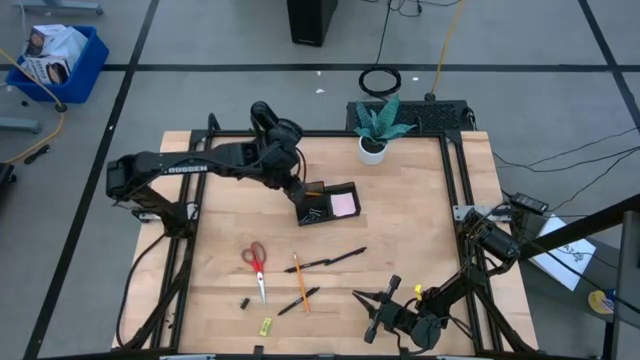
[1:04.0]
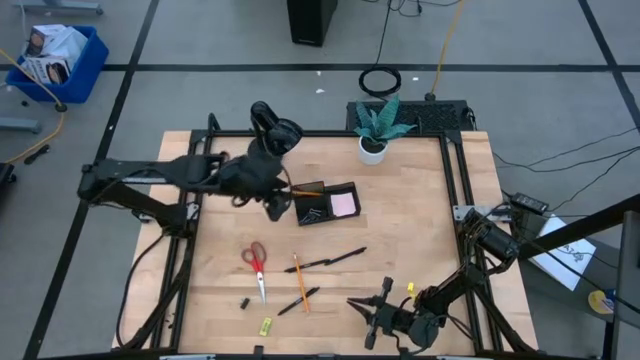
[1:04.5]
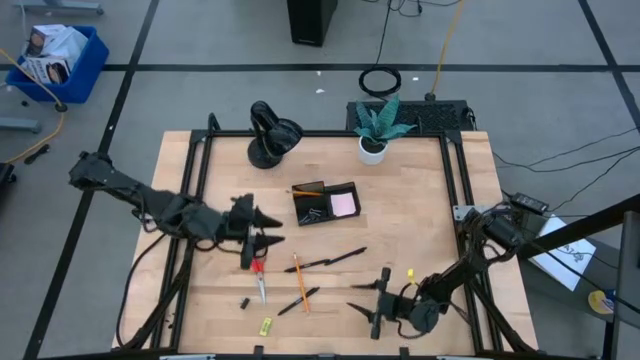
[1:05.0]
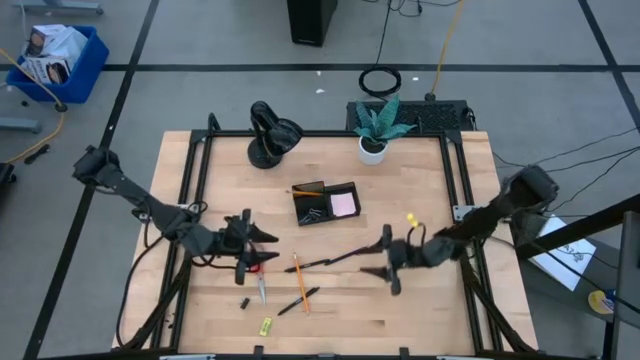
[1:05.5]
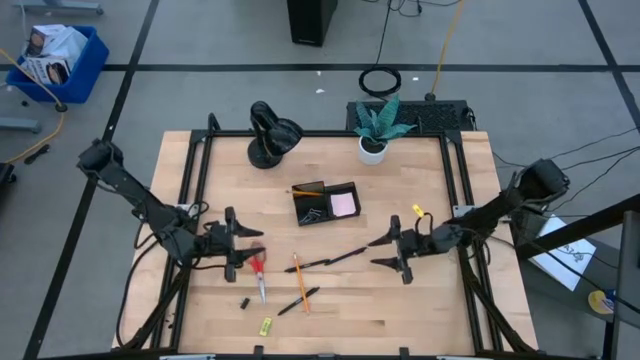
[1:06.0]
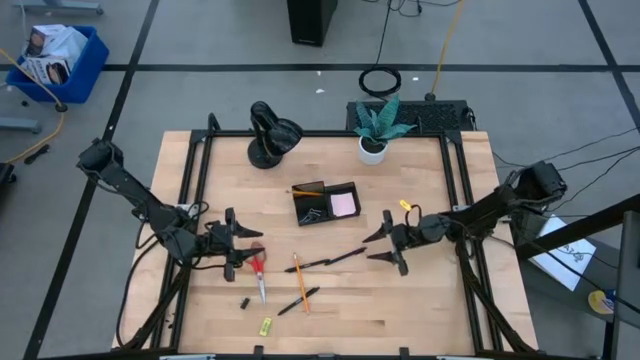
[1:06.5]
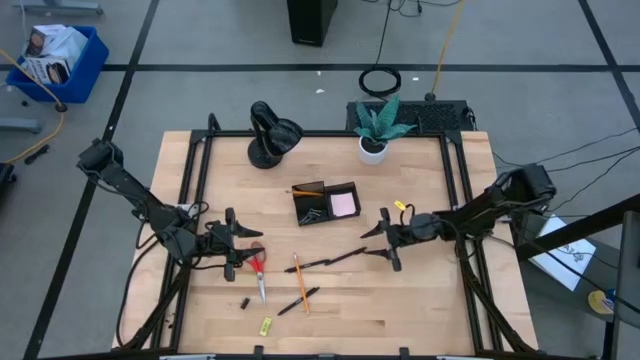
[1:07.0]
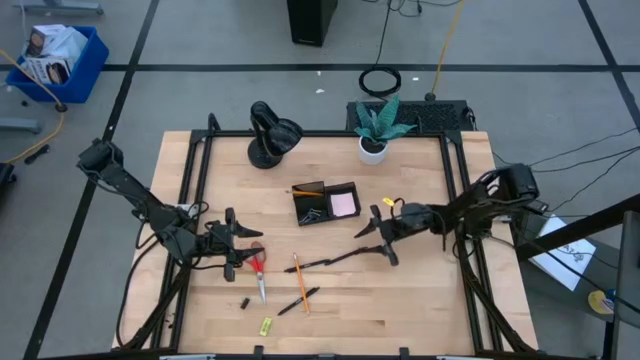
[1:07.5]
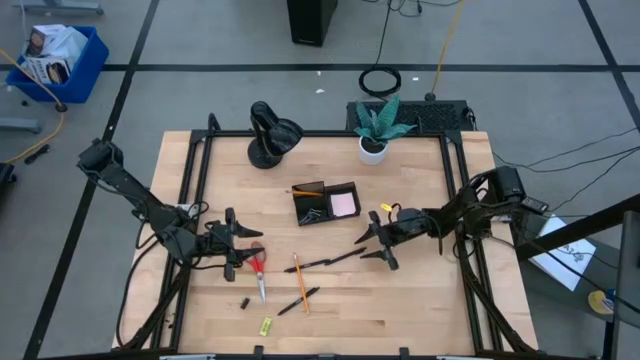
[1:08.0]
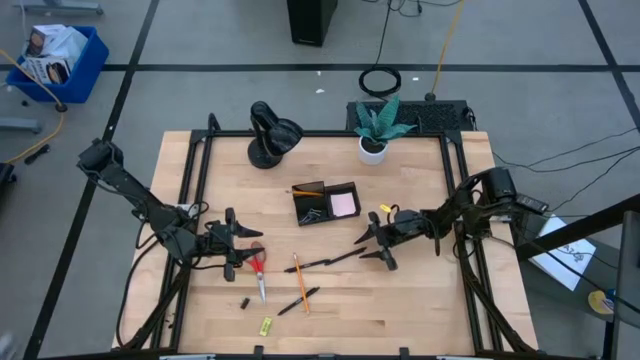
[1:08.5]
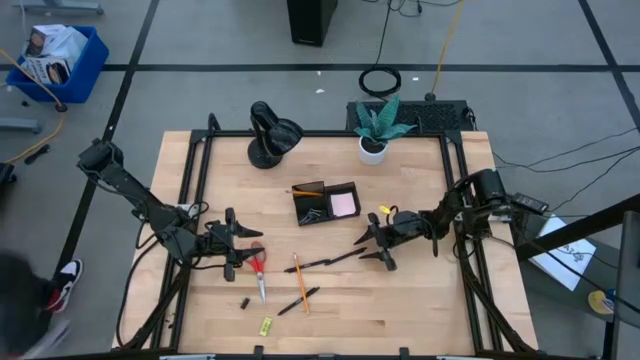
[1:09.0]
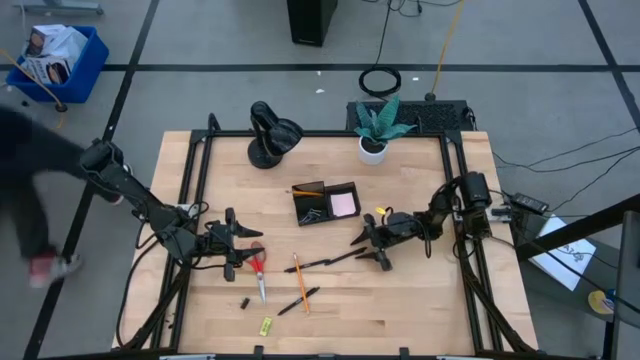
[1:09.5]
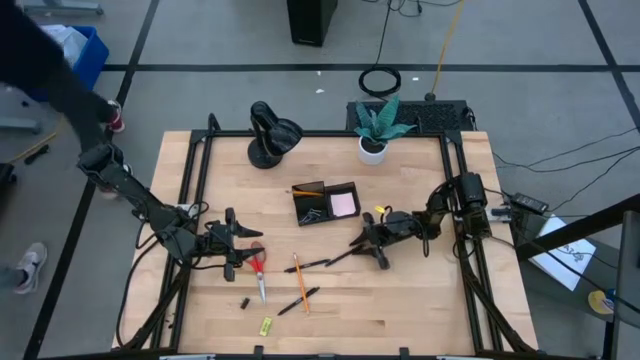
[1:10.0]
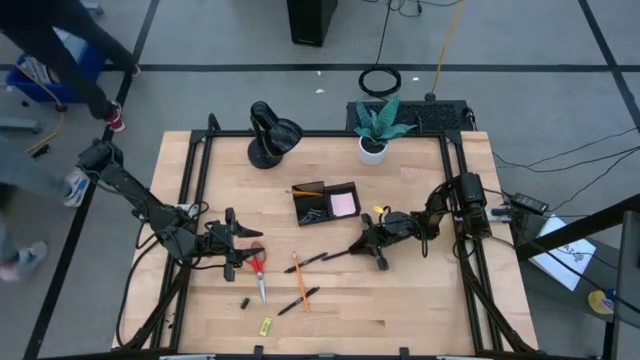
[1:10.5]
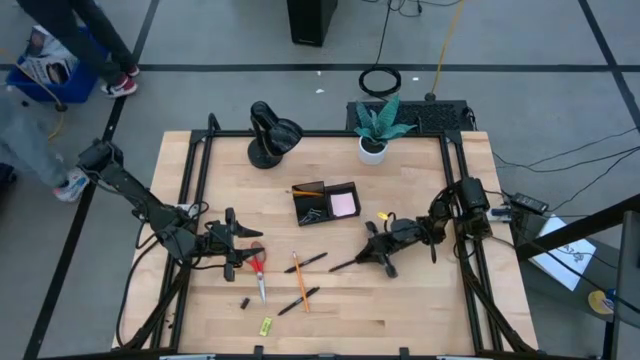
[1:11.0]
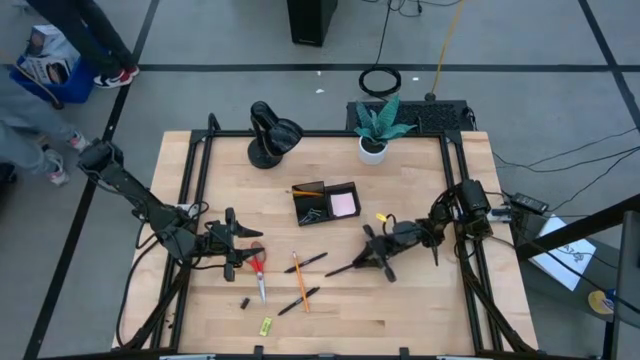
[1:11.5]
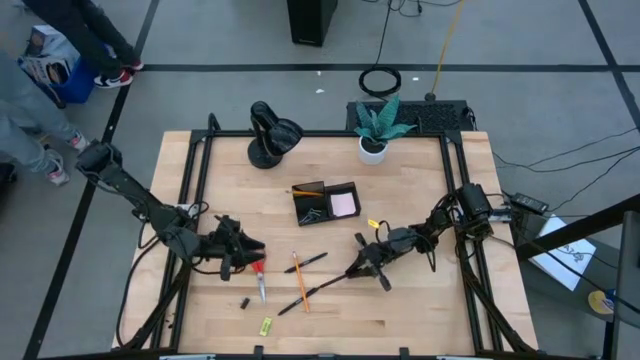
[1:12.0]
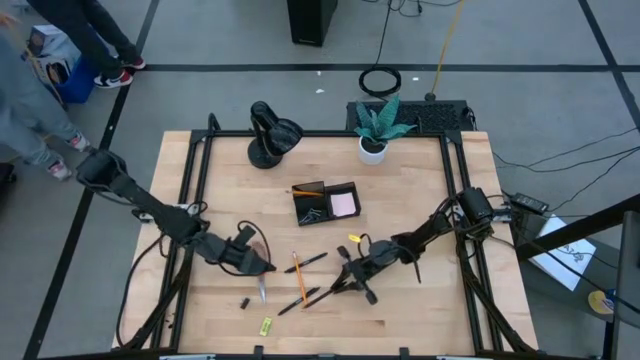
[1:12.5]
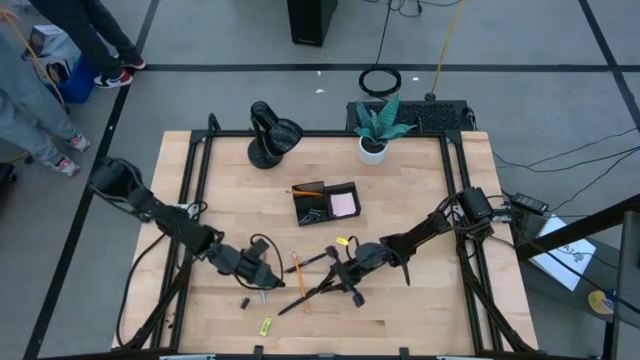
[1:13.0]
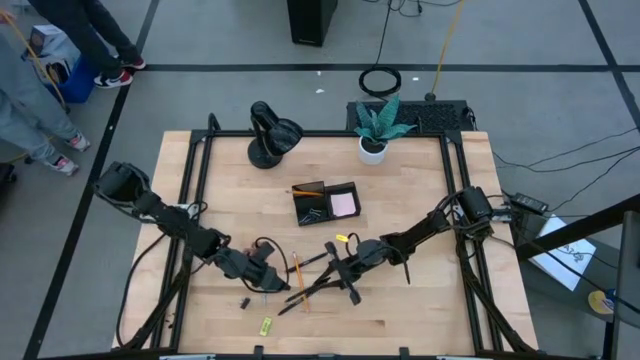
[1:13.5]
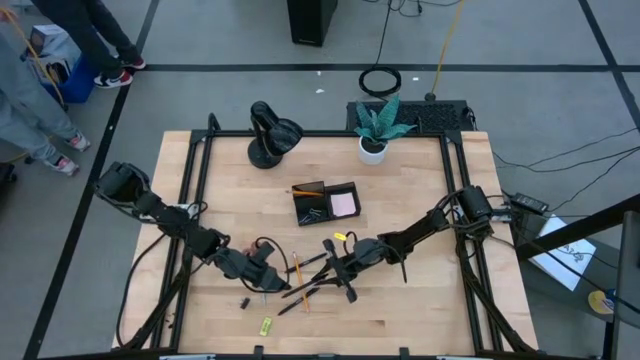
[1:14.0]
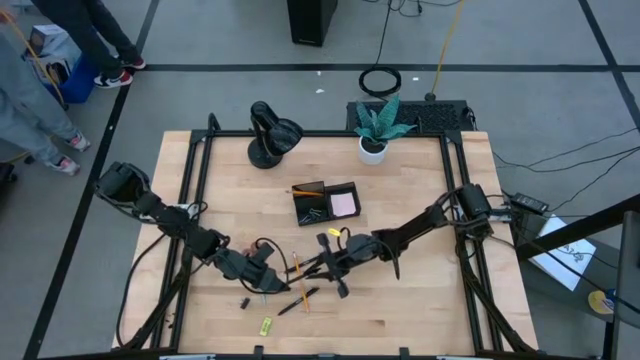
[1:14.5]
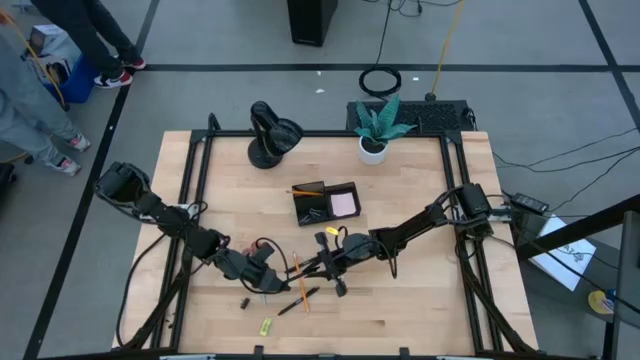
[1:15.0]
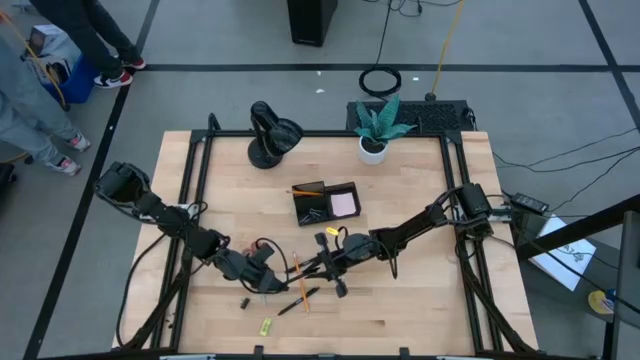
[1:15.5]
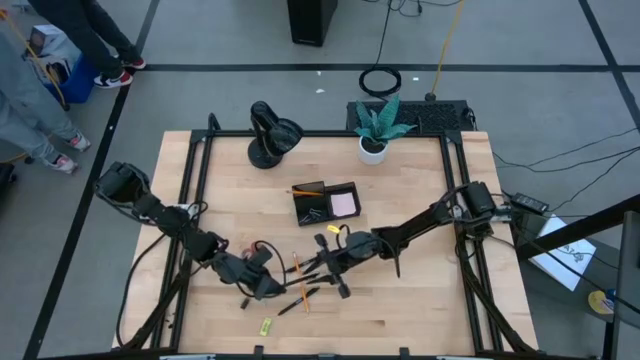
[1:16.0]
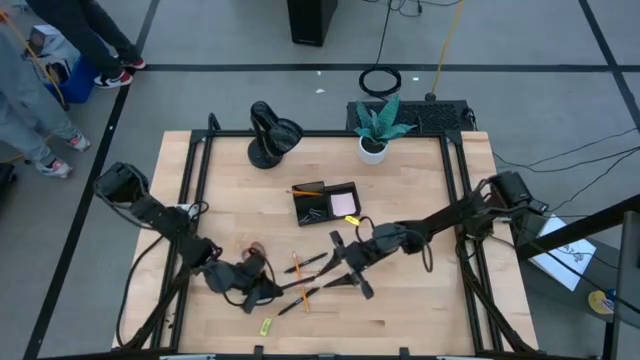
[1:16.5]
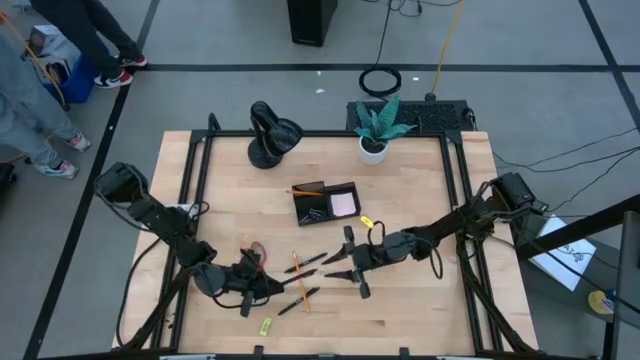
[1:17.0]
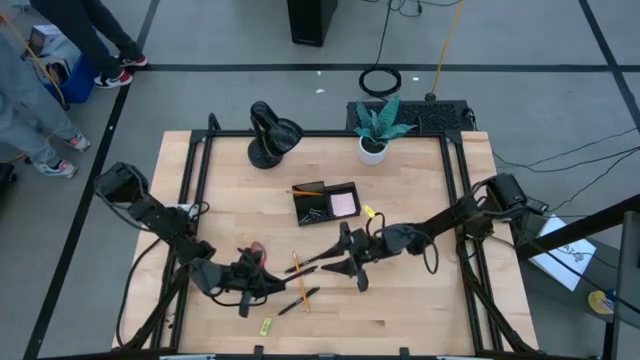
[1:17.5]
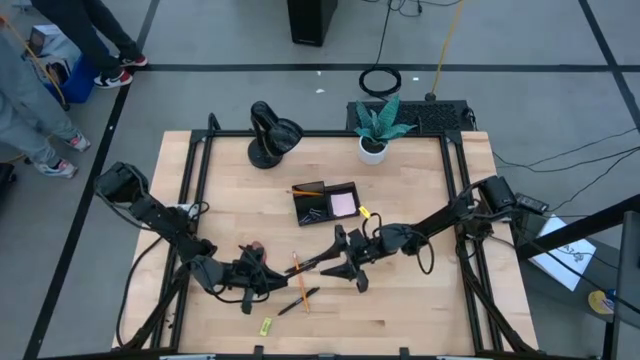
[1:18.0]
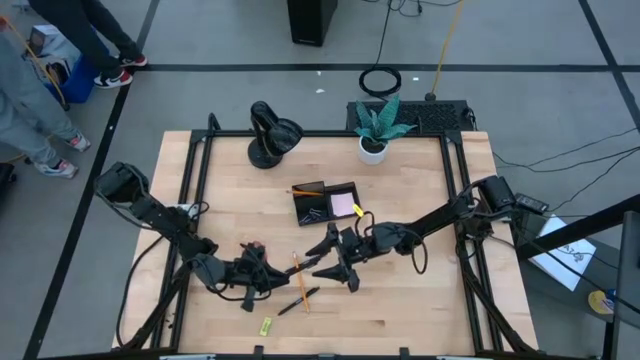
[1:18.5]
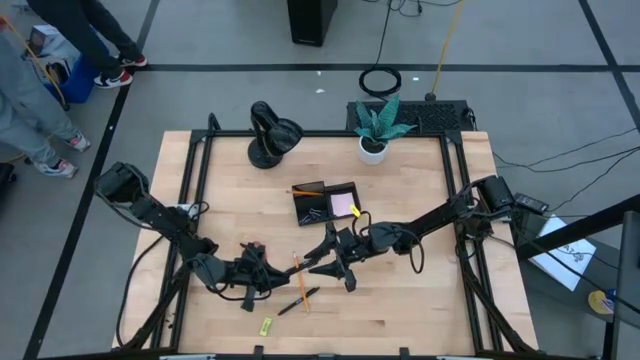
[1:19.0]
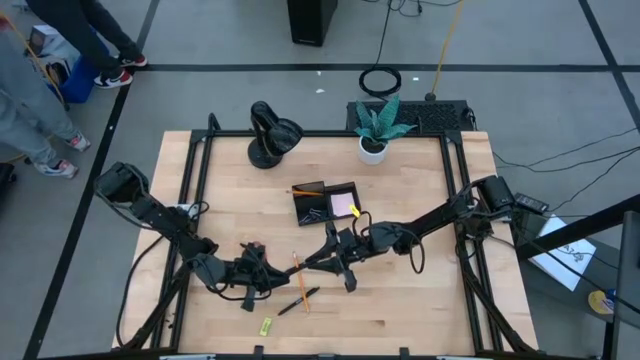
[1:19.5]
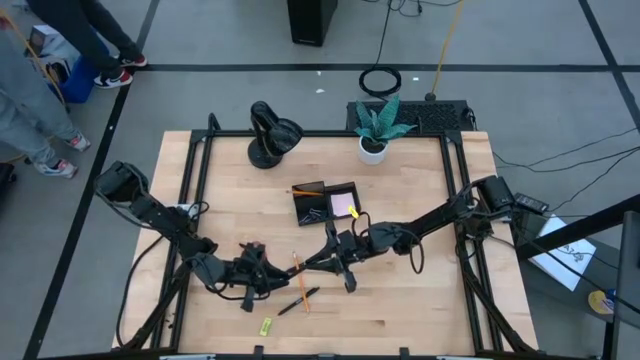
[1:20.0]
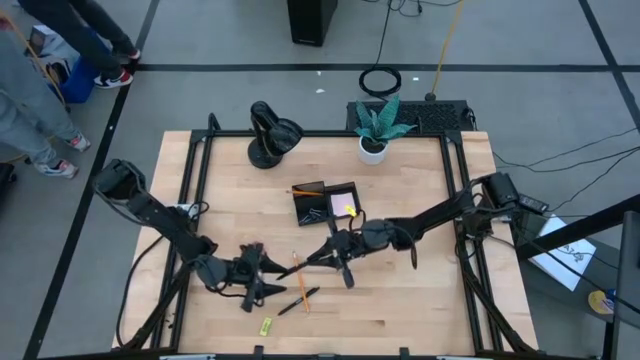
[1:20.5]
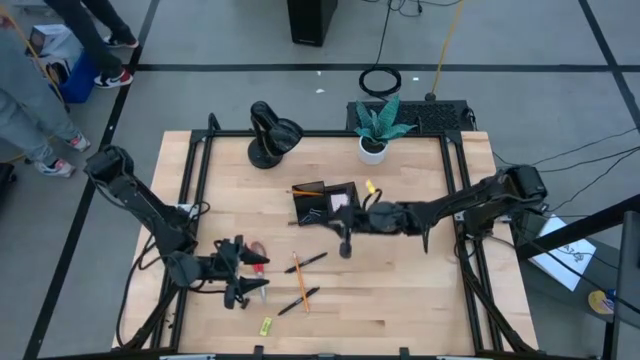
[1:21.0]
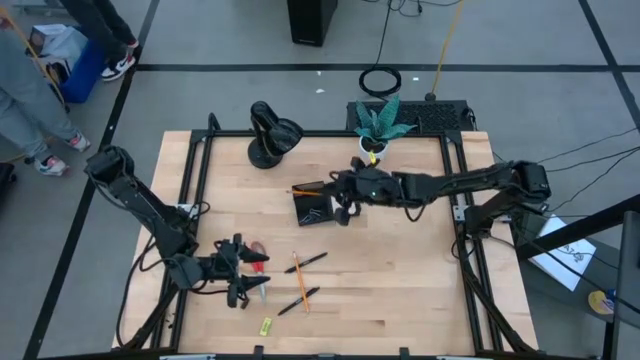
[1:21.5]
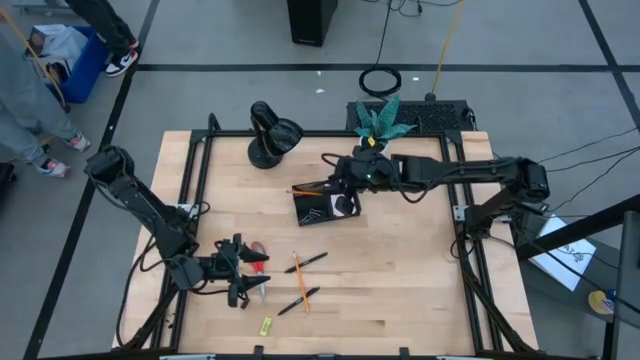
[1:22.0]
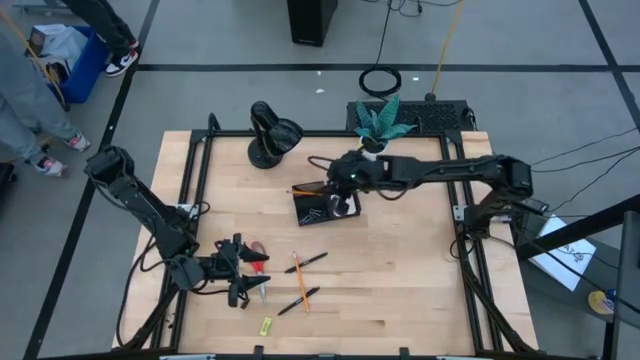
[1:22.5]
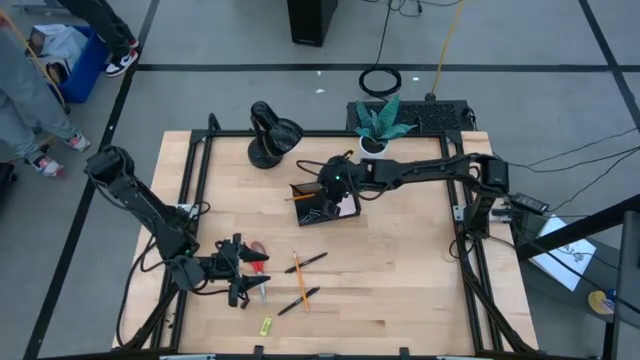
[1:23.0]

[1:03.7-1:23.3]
Task: Pick and place office supplies into organizer
Put the black binder clip into the desk organizer

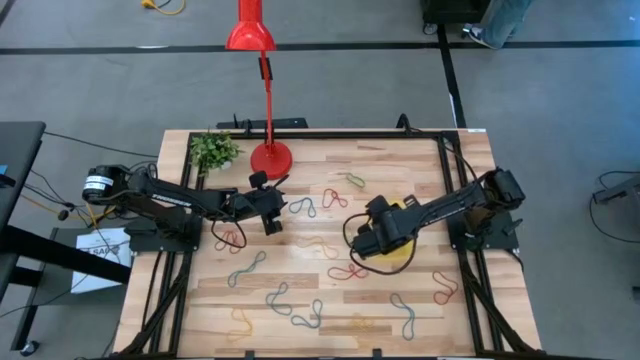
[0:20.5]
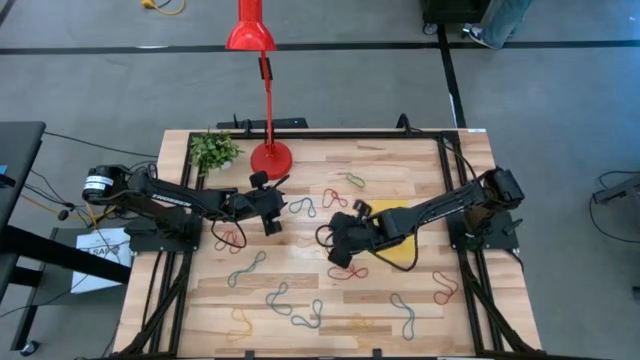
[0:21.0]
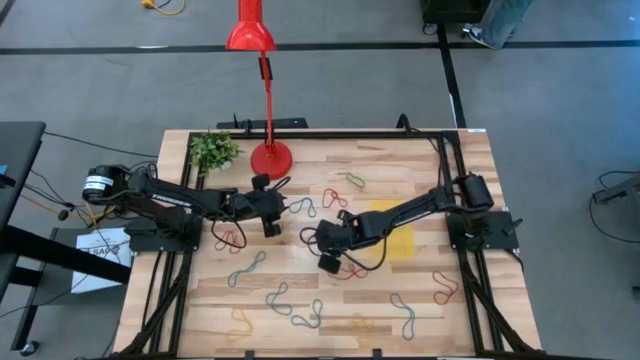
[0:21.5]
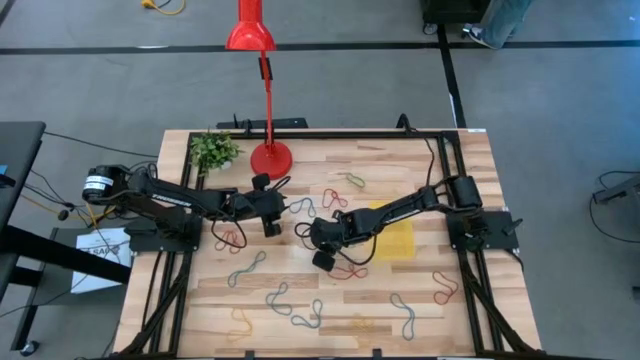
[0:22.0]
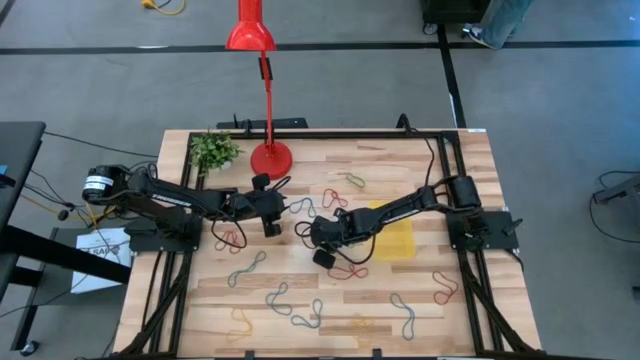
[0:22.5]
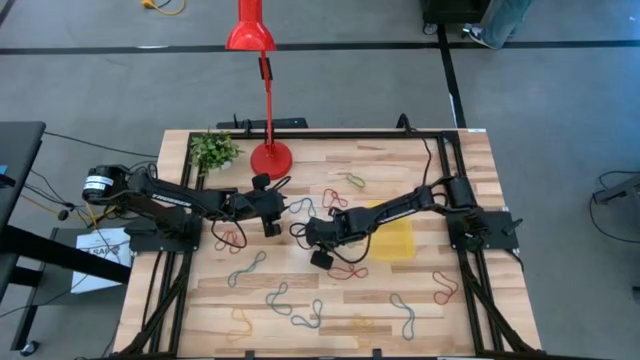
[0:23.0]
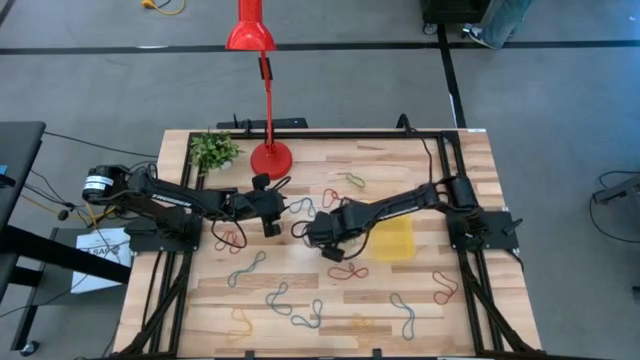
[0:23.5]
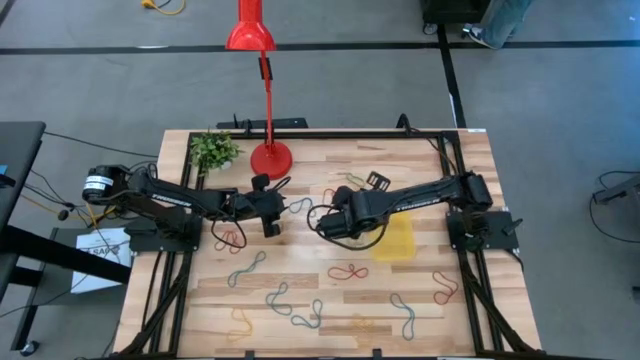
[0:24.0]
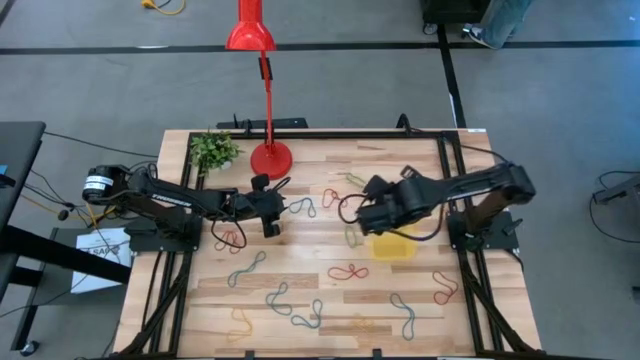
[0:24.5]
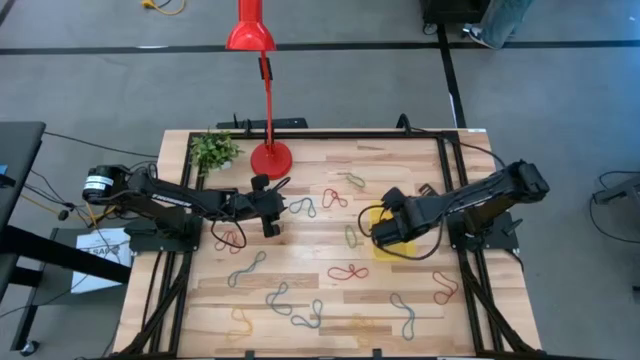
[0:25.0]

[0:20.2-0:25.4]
Task: Pick and place items into bin
Put the yellow rubber band into the yellow bin
